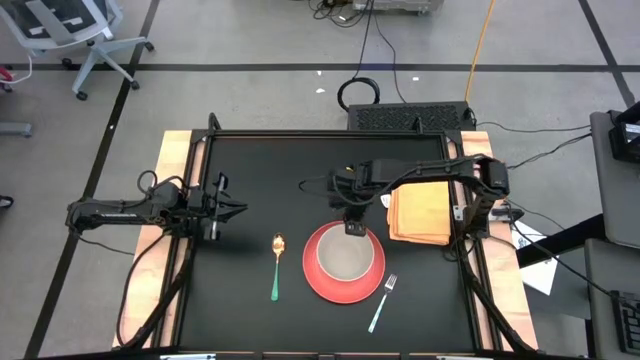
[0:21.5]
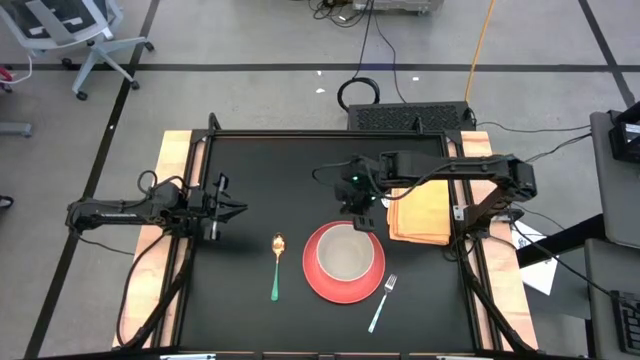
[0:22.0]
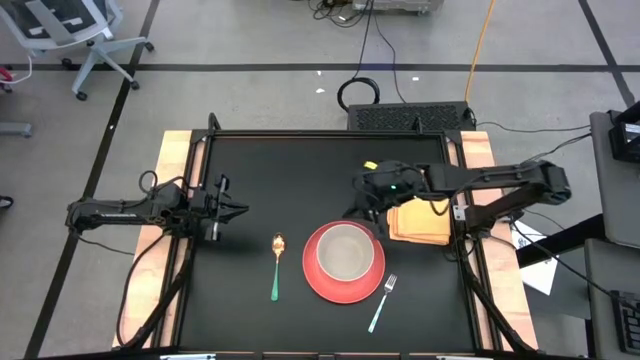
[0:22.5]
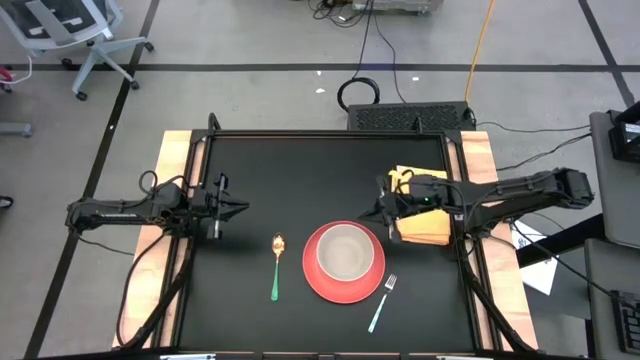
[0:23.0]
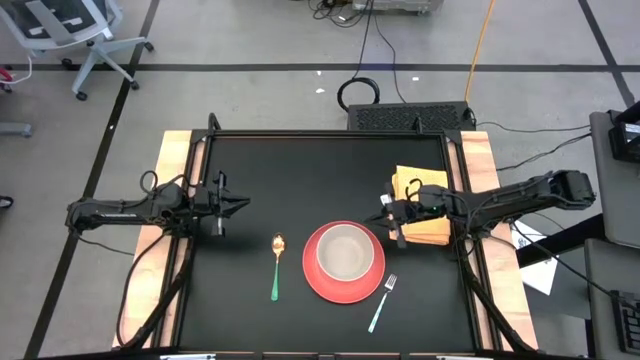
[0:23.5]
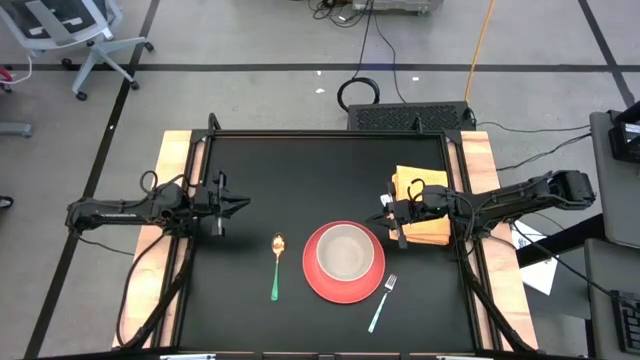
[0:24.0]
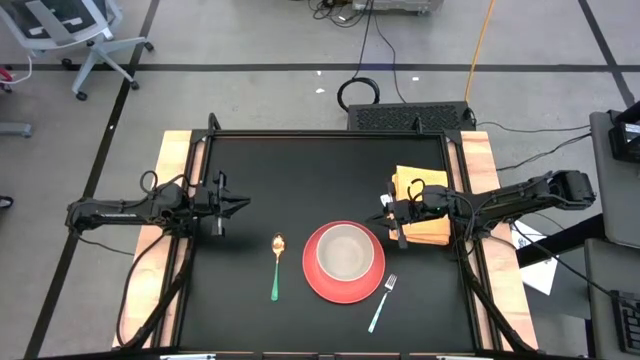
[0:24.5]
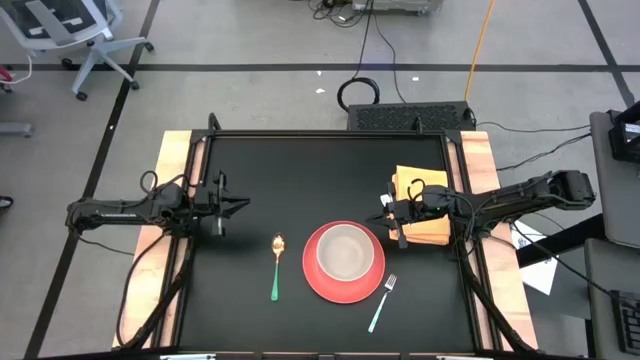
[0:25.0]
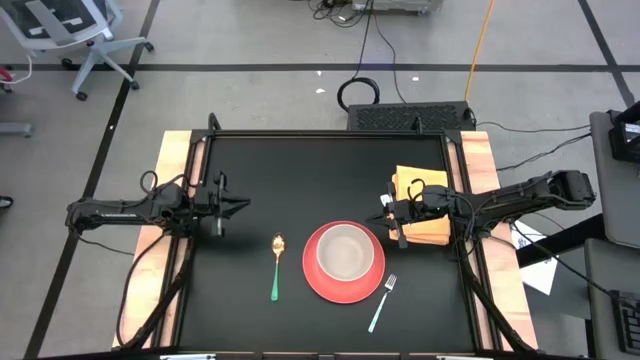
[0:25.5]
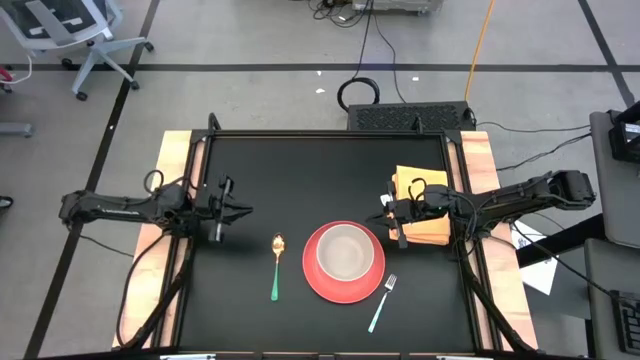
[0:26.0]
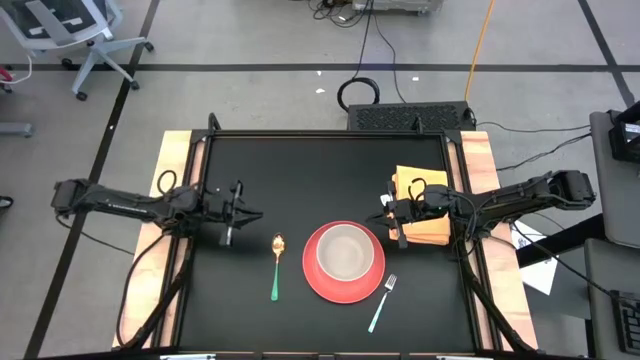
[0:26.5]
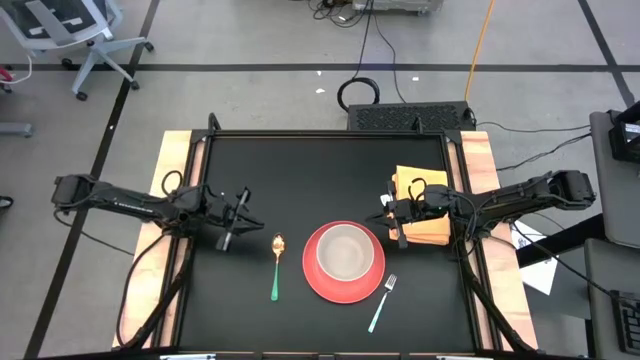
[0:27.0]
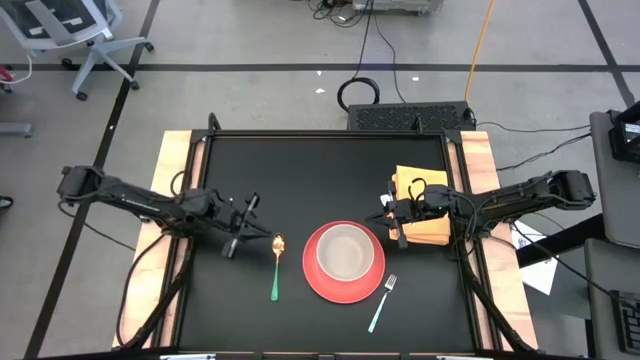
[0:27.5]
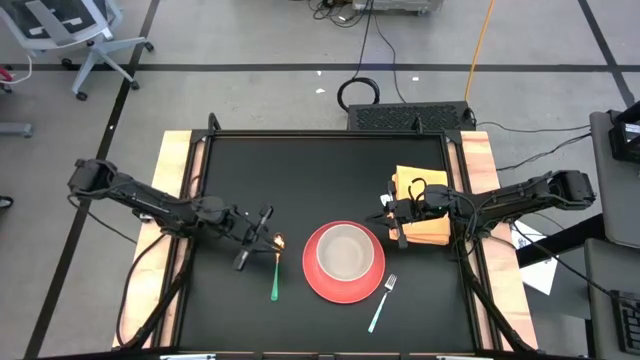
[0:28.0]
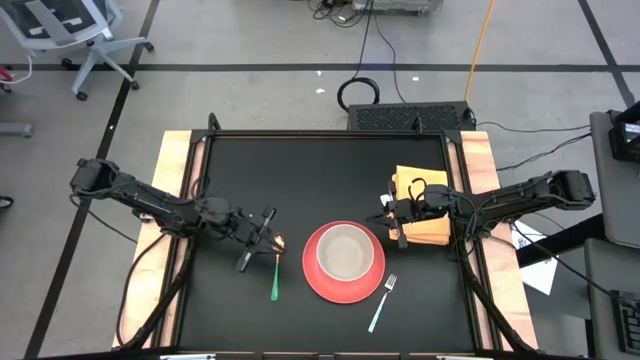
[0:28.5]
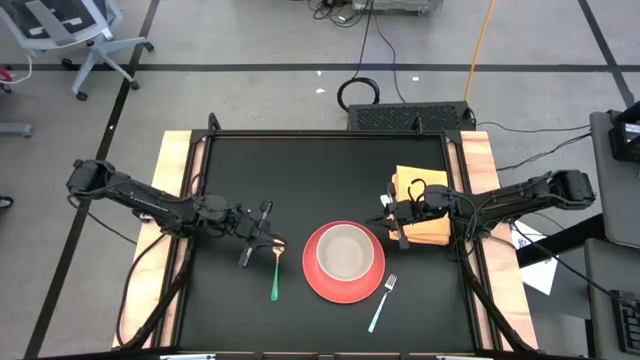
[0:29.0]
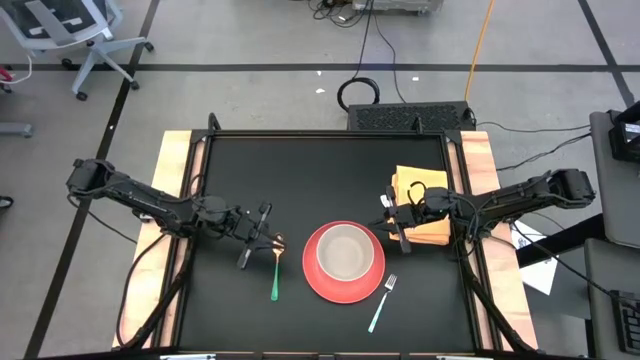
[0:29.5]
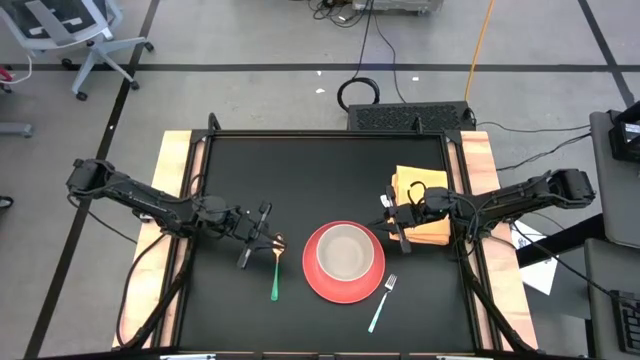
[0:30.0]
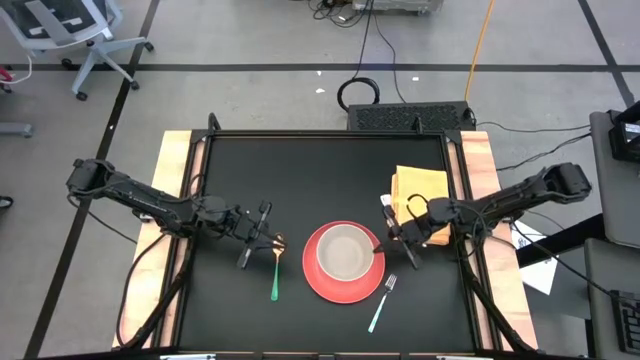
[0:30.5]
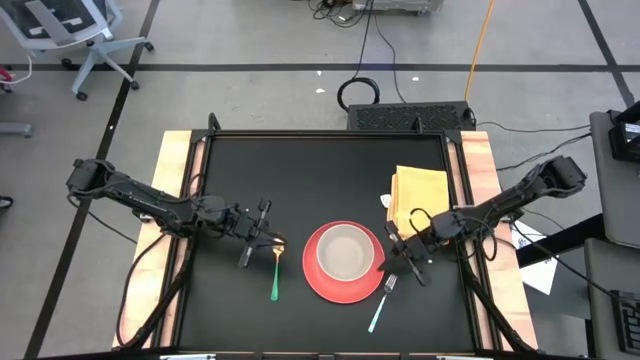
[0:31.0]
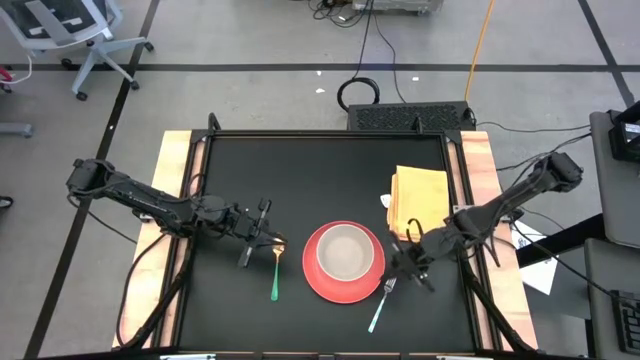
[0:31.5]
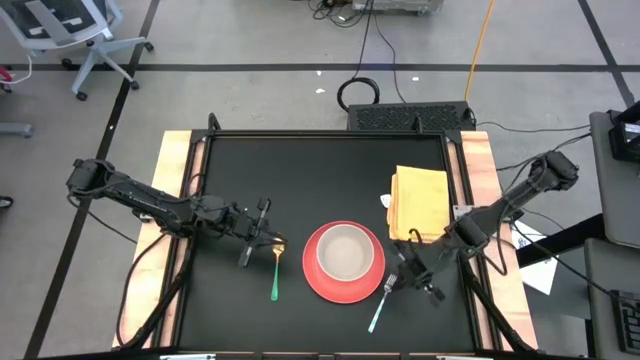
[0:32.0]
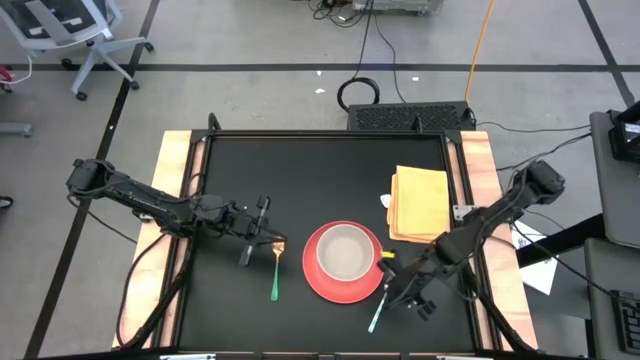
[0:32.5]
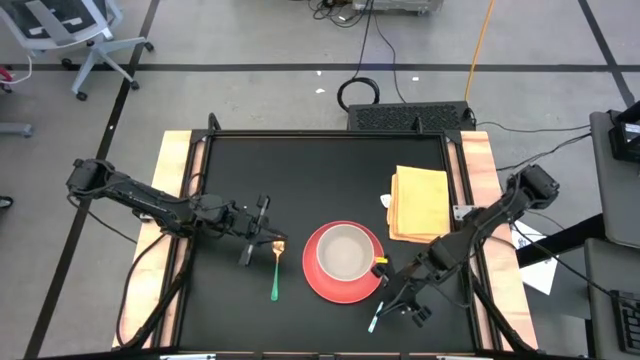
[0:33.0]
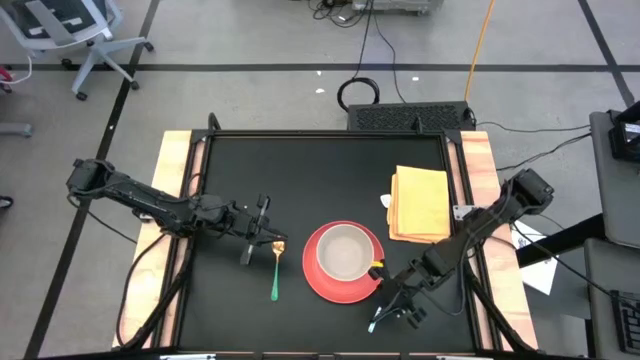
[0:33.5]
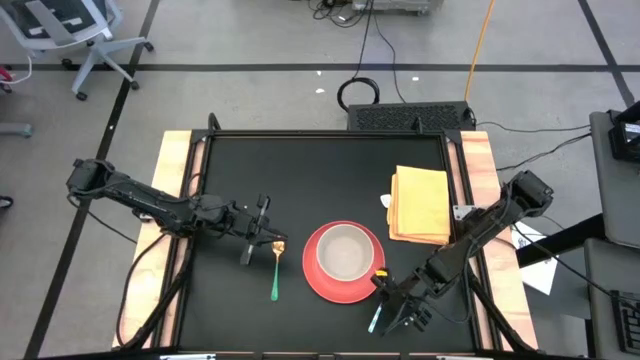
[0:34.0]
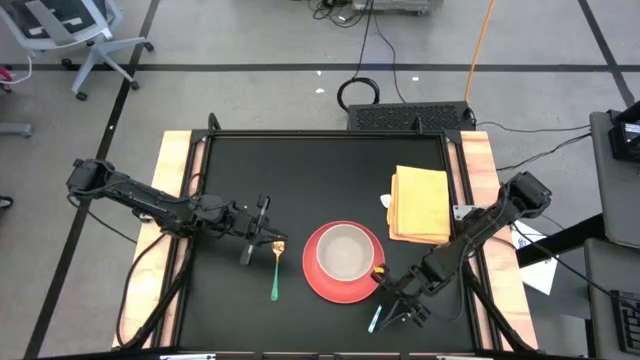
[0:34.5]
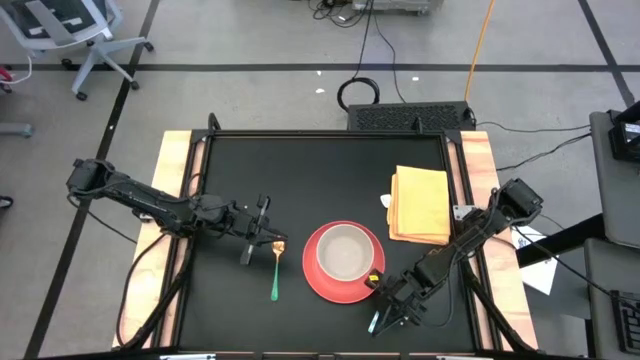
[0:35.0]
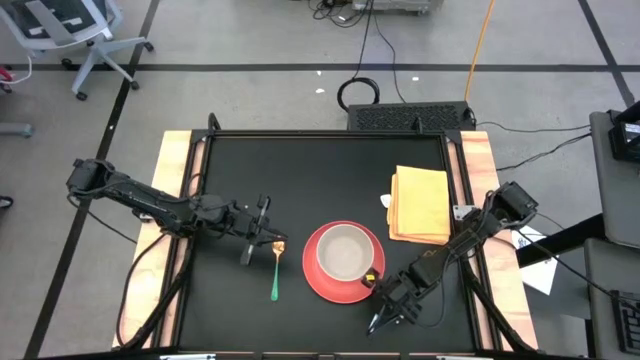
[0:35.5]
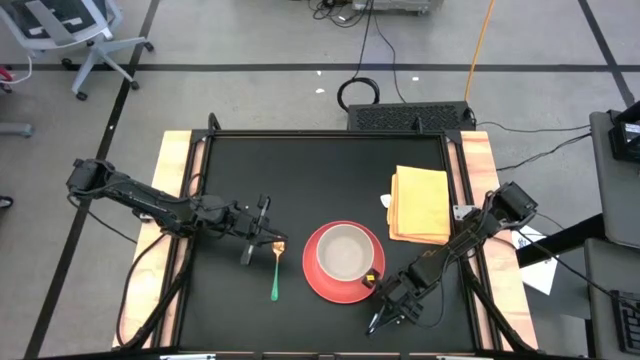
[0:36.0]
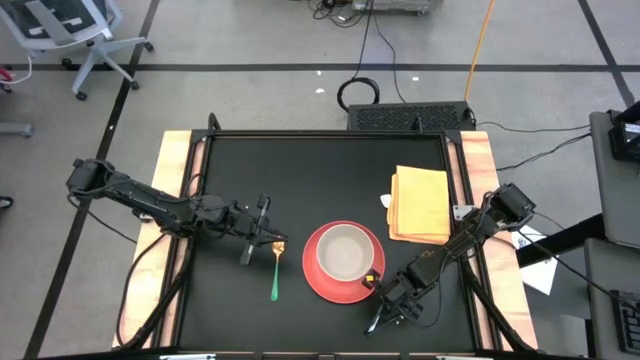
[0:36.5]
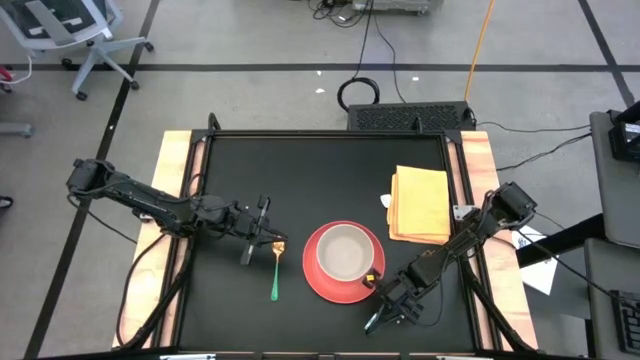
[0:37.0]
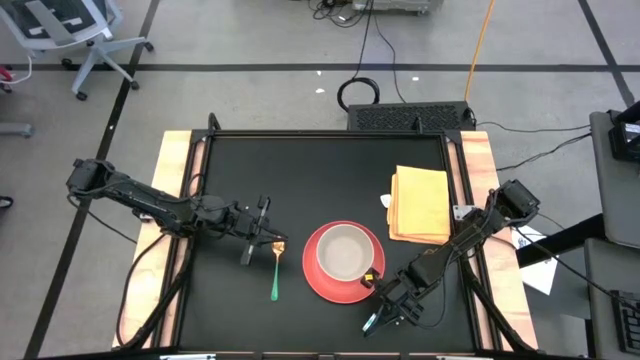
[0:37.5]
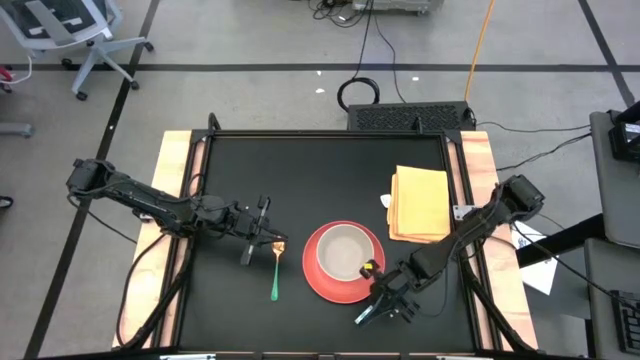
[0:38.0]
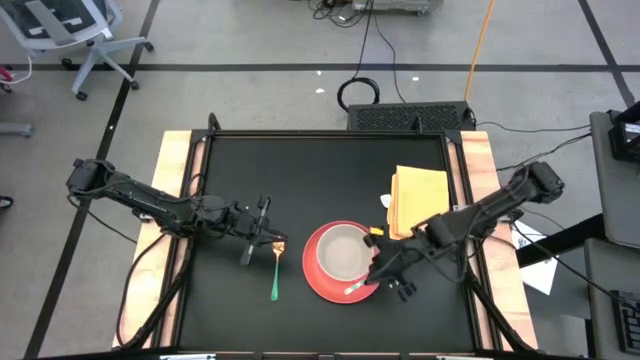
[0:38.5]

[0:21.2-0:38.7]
Task: Set table place
Put the green patterned fork on the orange plate to the left of the white bowl

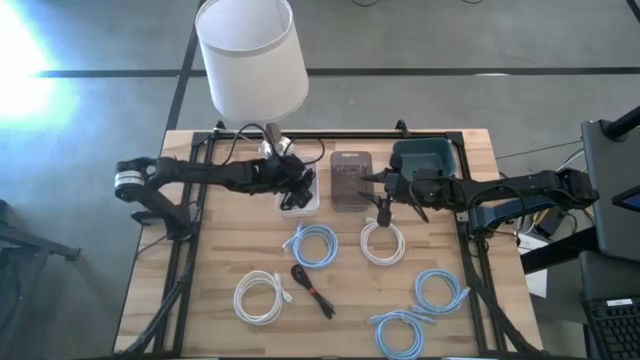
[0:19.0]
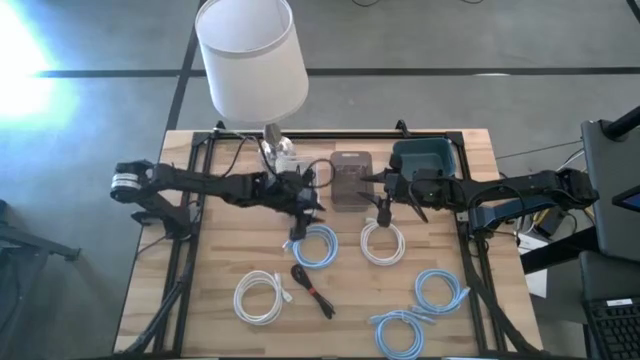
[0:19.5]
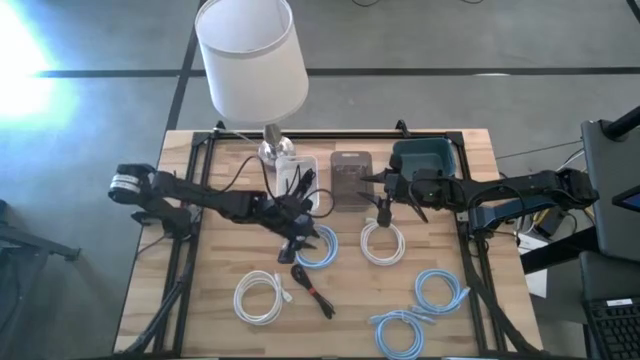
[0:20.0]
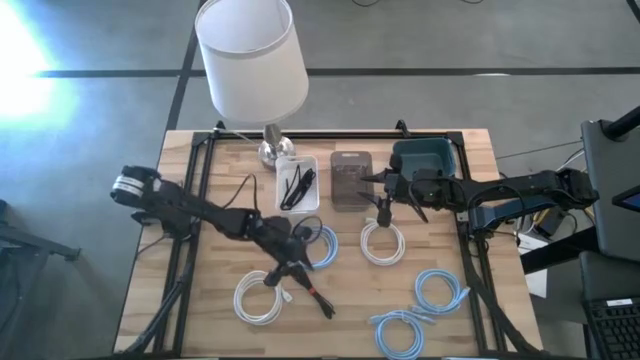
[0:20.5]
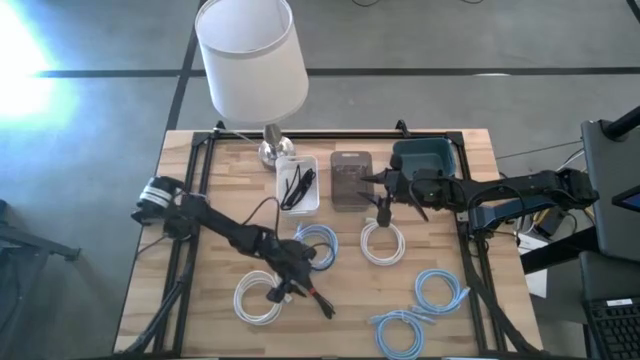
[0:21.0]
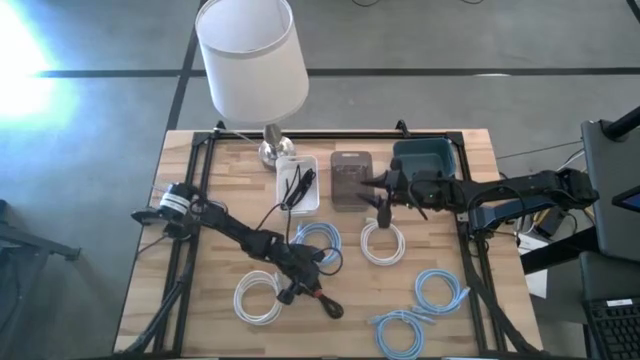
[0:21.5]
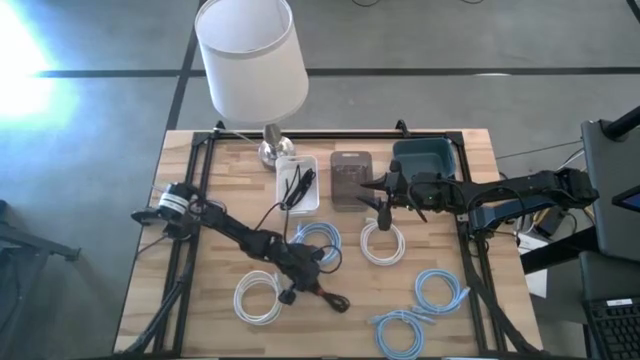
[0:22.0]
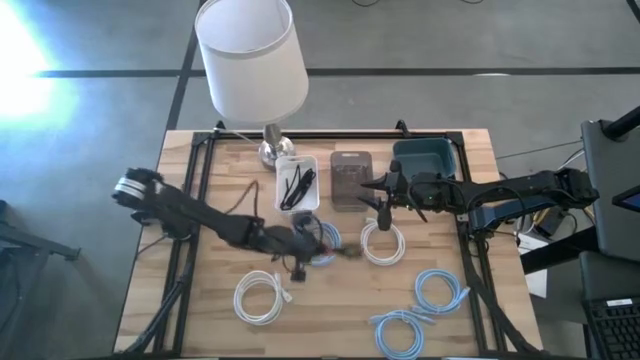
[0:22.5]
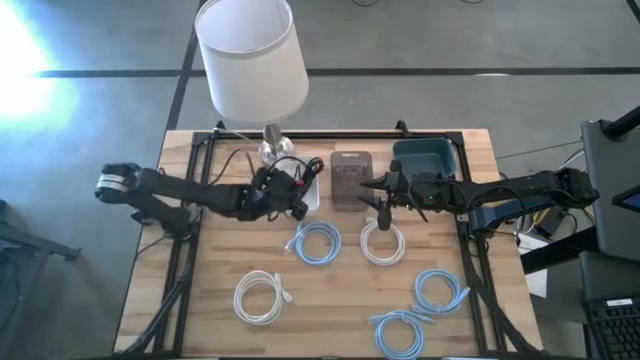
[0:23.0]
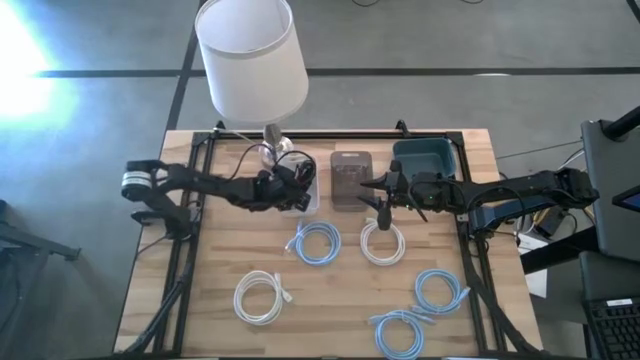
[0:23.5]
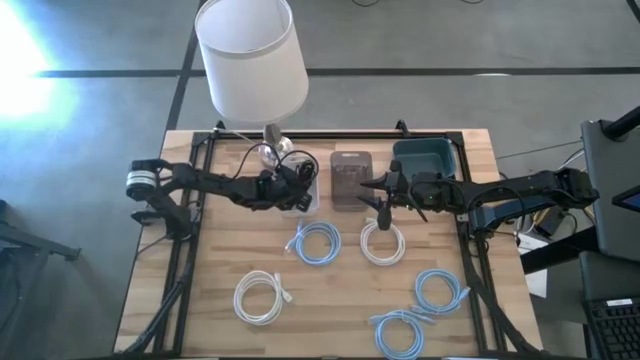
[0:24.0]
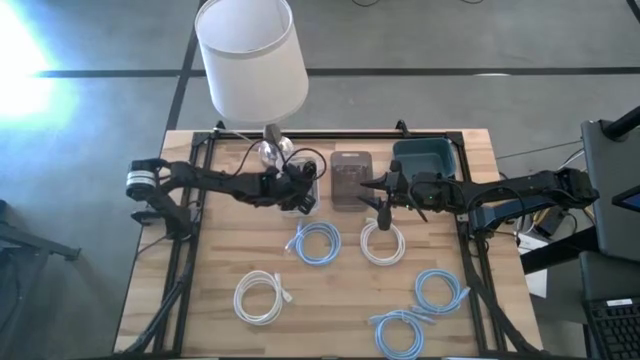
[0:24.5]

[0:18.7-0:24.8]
Task: Pick & Place USB Port
Put the black charger cable into the white bin
